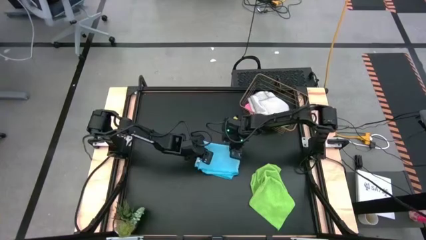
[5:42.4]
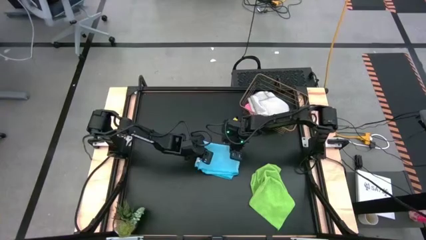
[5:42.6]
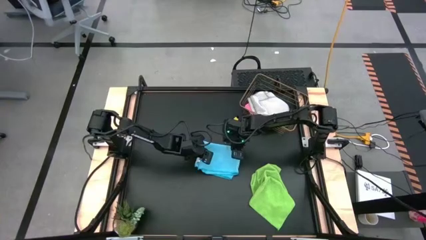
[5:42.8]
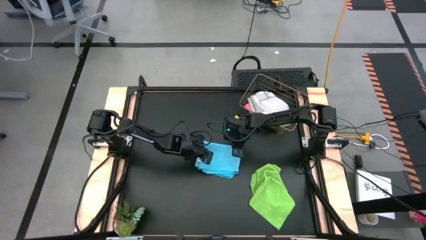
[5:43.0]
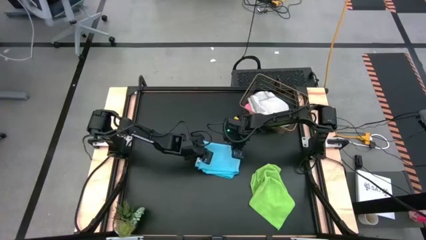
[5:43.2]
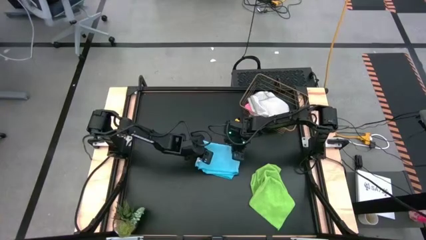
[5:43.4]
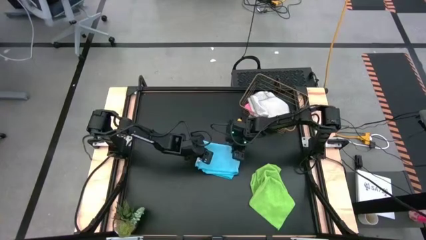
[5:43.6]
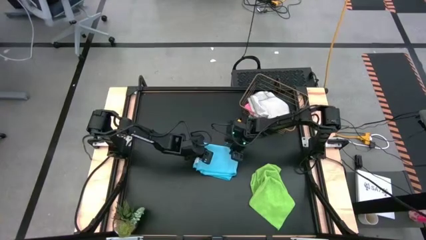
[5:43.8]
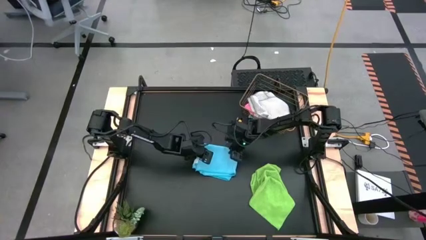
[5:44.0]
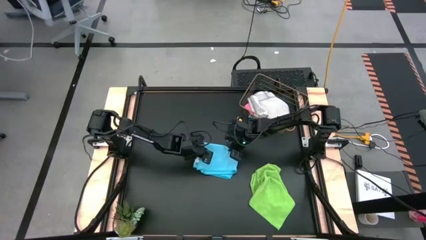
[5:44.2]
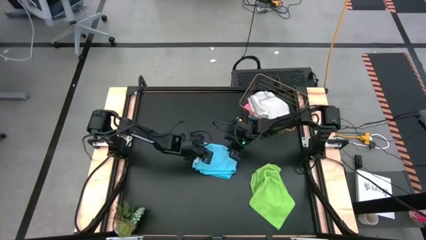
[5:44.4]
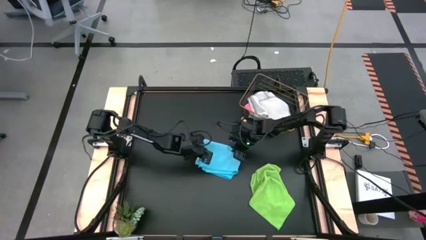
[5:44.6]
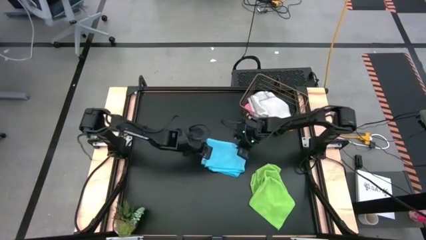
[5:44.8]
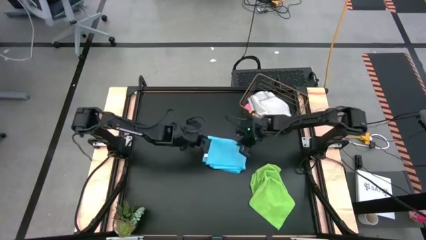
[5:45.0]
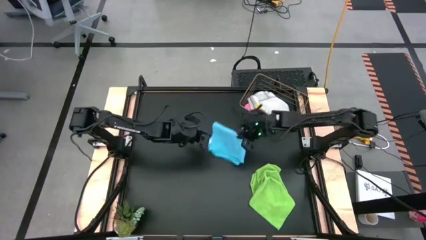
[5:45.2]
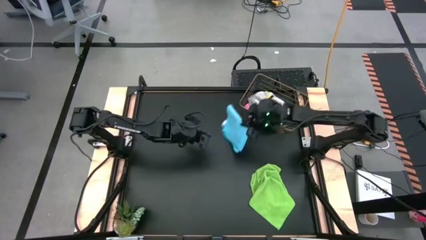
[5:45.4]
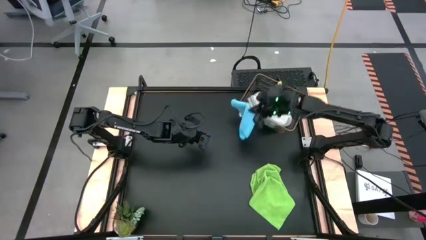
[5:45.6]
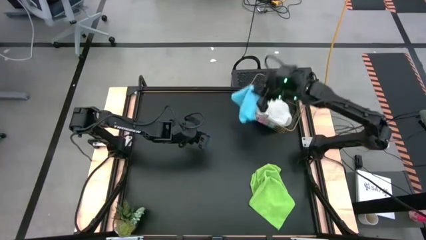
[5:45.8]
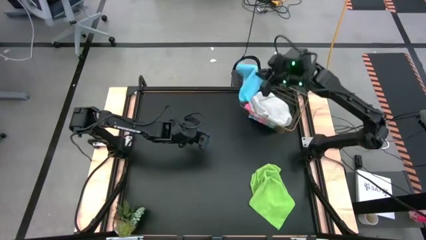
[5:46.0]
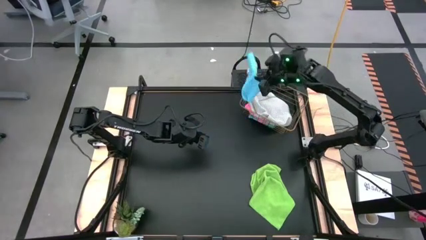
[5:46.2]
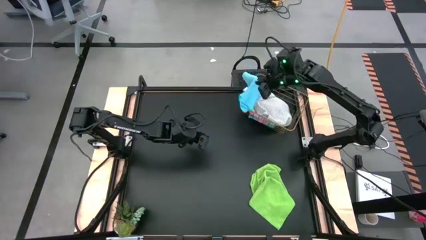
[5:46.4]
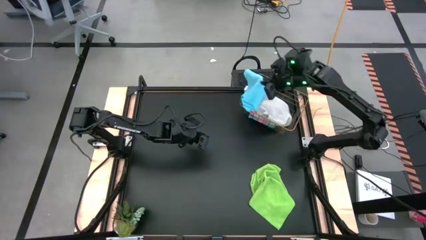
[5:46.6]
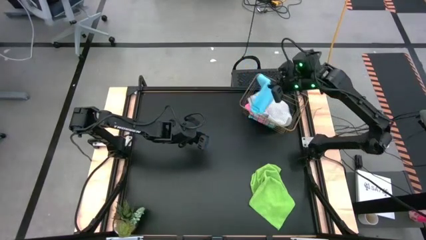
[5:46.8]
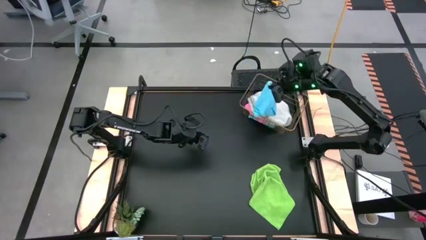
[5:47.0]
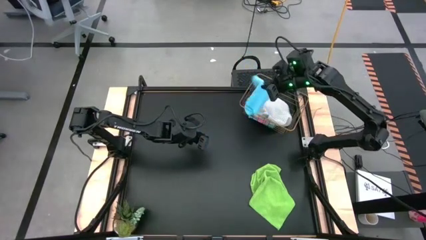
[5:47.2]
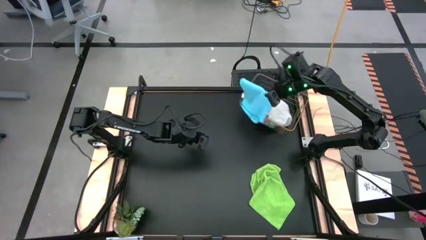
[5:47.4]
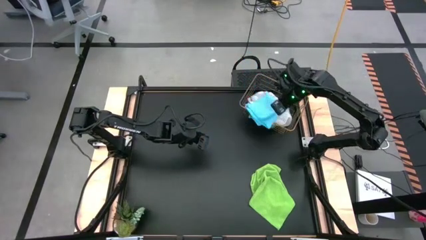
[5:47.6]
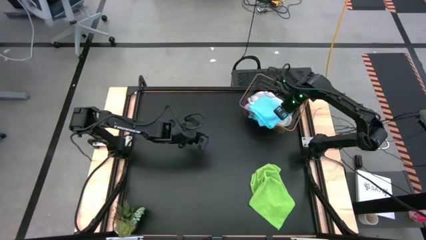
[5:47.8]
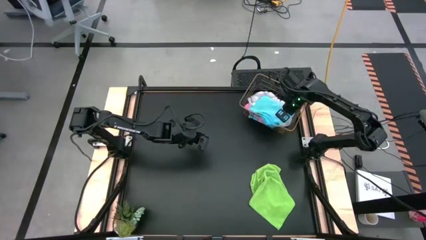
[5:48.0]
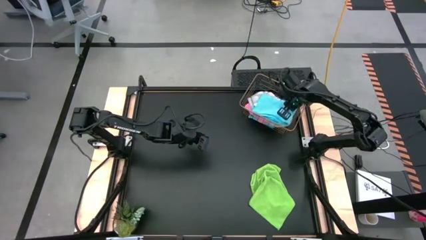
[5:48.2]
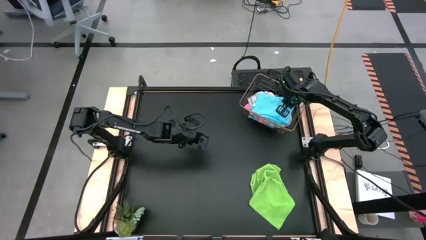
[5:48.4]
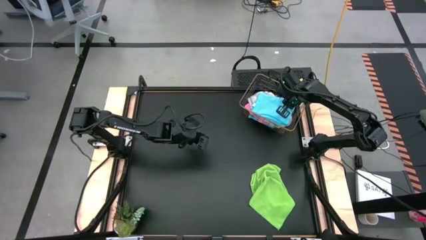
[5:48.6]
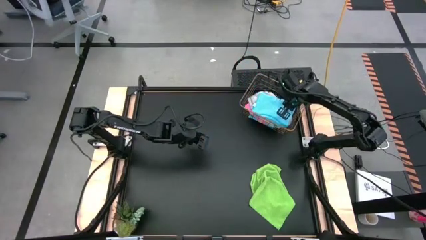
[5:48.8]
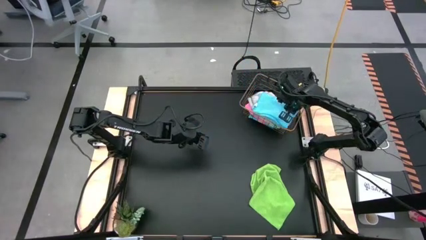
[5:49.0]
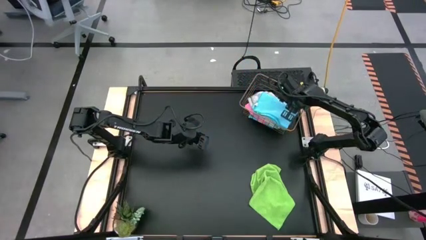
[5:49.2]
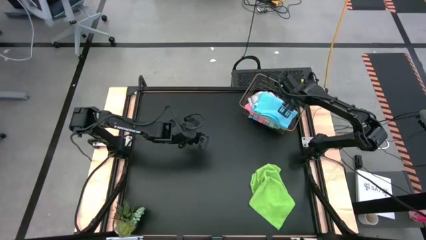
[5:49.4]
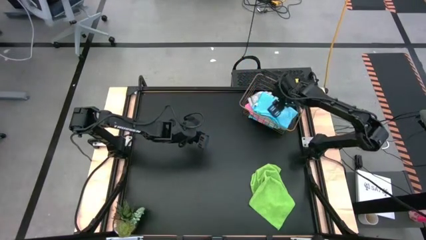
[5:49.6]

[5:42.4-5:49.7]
Task: Fold microfiber towels
Put the folded blue towel into the gold wire basket

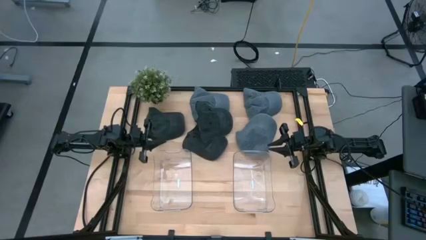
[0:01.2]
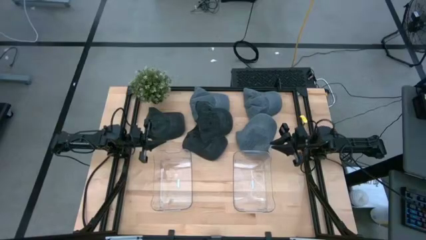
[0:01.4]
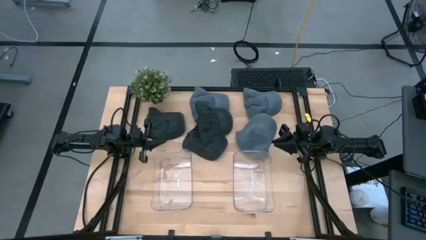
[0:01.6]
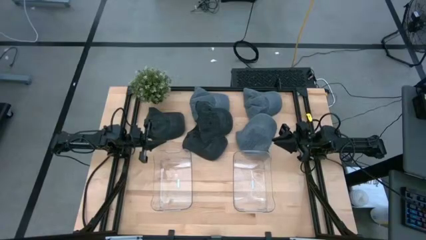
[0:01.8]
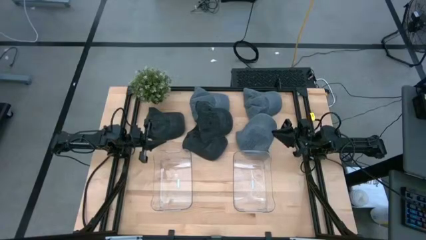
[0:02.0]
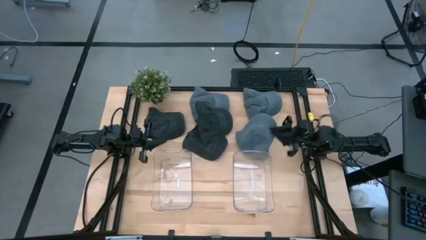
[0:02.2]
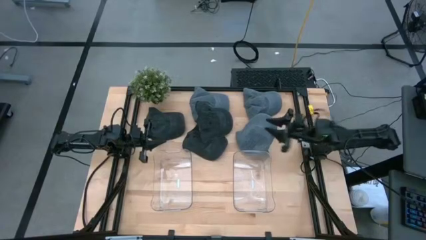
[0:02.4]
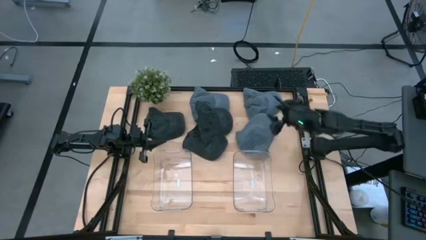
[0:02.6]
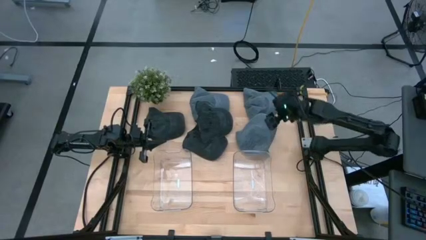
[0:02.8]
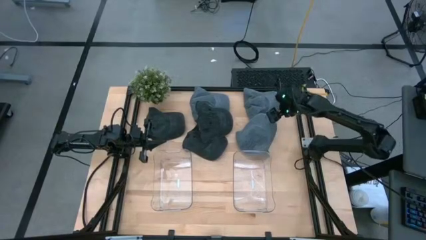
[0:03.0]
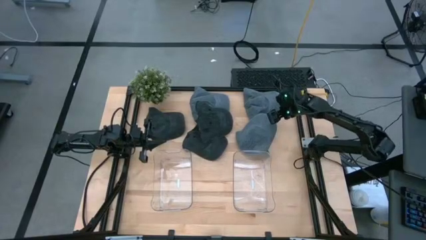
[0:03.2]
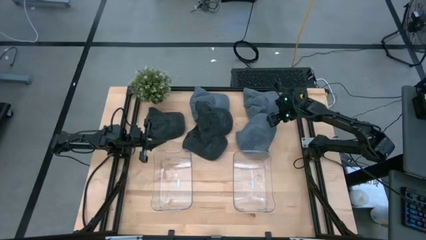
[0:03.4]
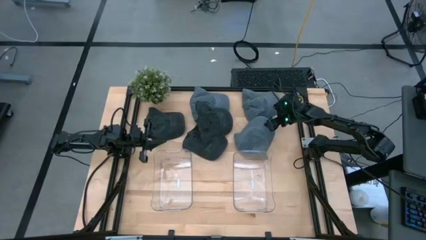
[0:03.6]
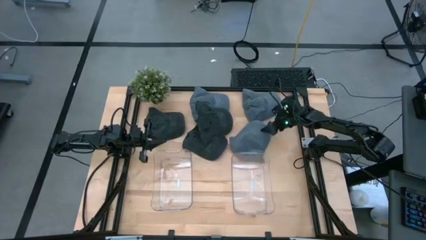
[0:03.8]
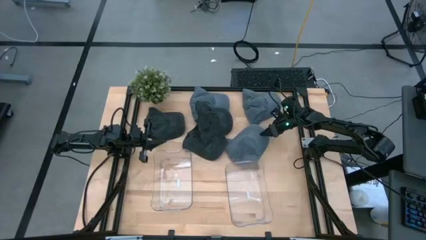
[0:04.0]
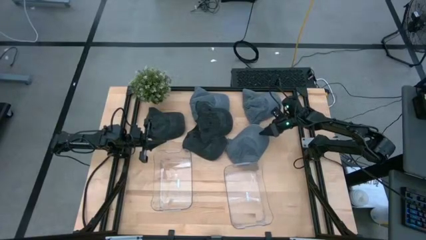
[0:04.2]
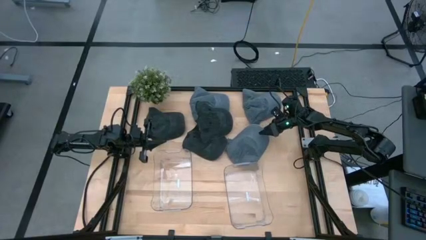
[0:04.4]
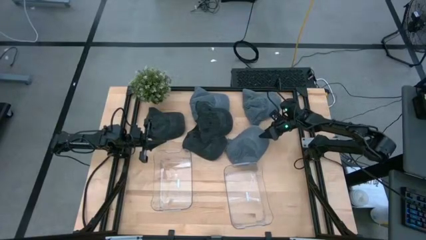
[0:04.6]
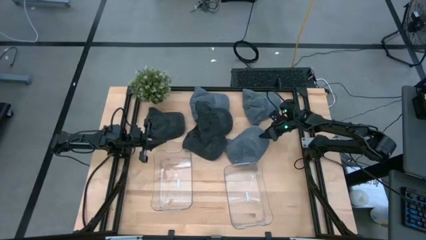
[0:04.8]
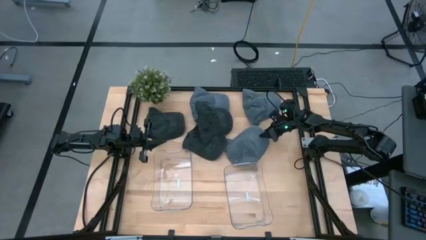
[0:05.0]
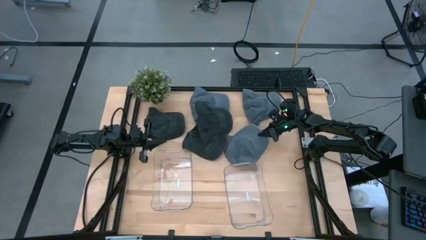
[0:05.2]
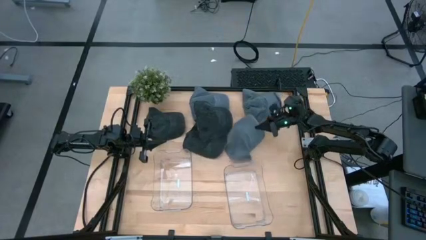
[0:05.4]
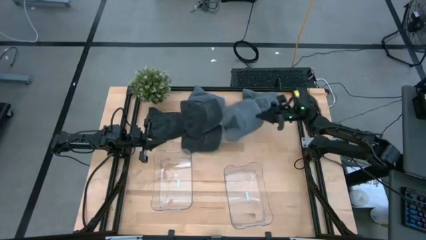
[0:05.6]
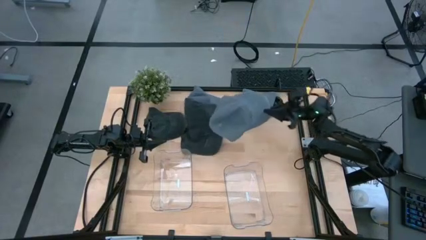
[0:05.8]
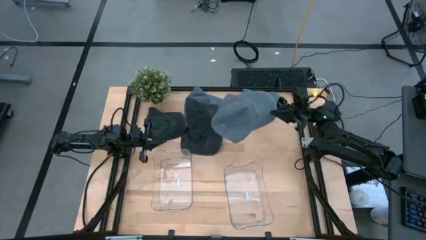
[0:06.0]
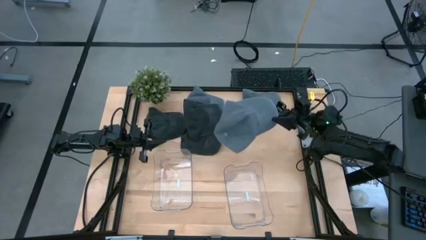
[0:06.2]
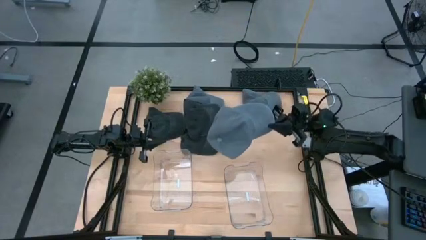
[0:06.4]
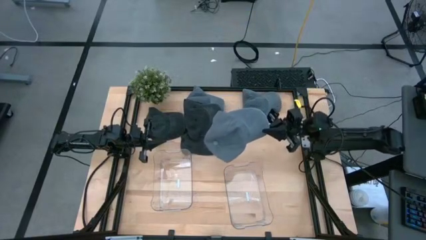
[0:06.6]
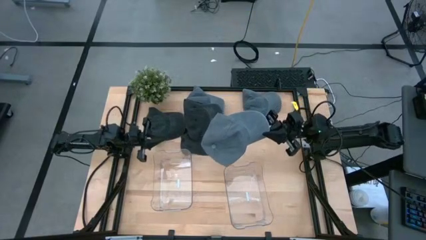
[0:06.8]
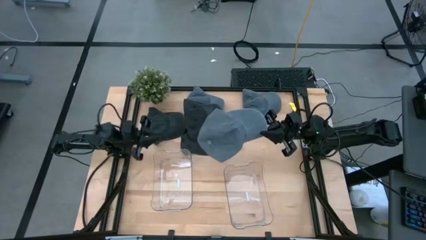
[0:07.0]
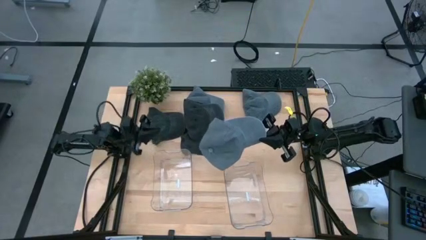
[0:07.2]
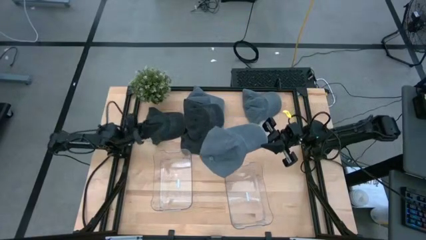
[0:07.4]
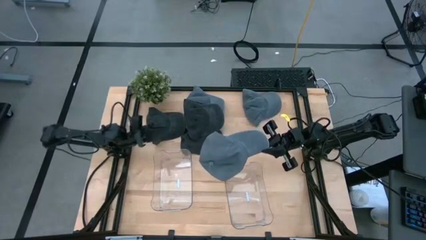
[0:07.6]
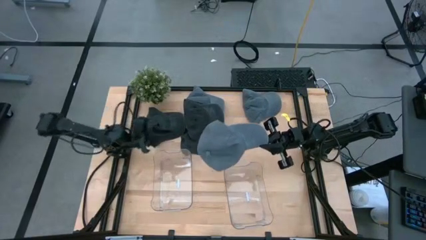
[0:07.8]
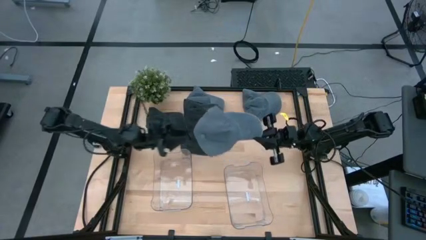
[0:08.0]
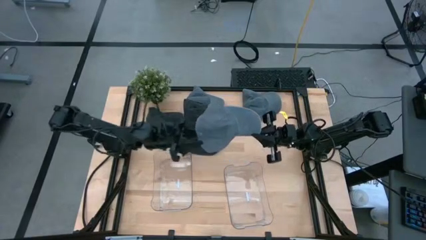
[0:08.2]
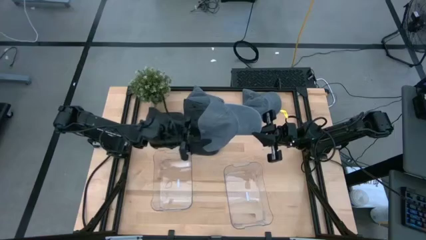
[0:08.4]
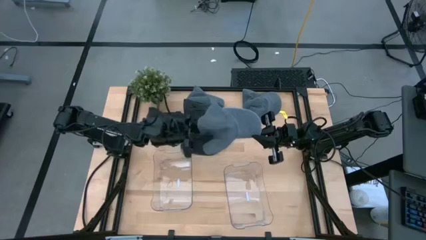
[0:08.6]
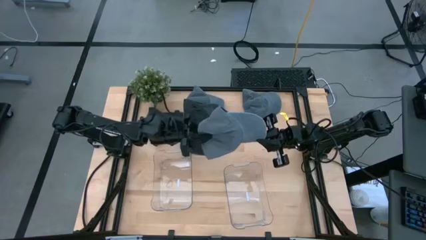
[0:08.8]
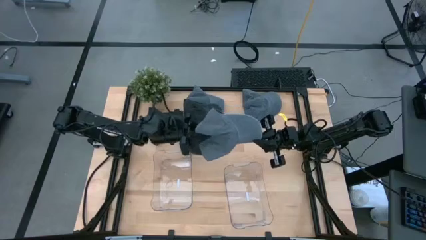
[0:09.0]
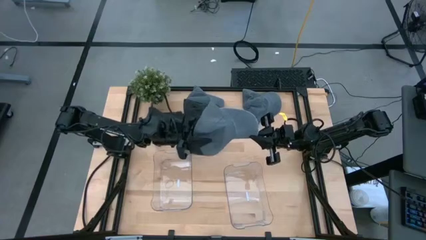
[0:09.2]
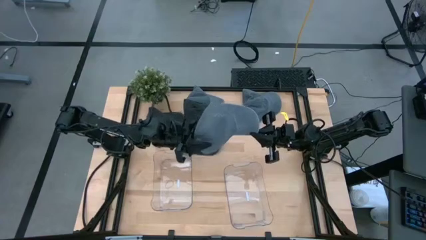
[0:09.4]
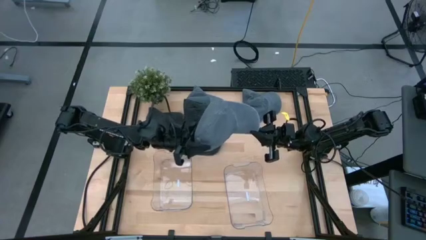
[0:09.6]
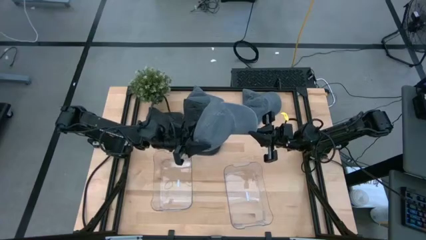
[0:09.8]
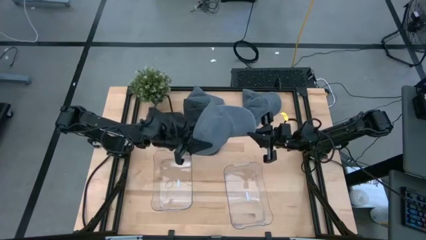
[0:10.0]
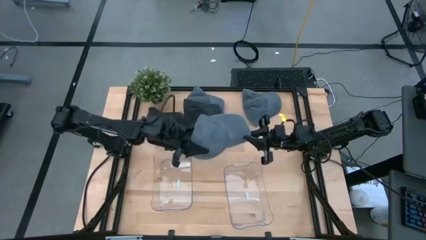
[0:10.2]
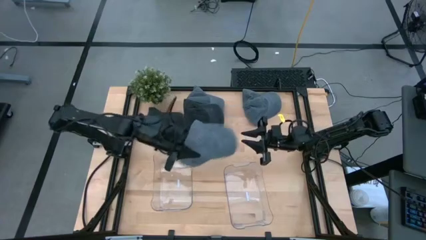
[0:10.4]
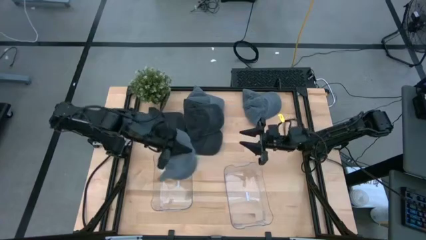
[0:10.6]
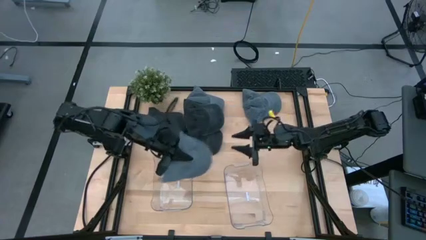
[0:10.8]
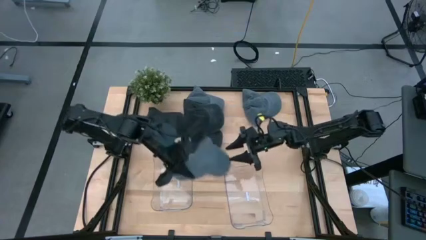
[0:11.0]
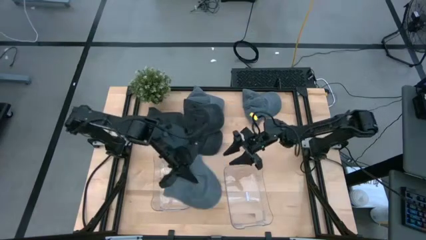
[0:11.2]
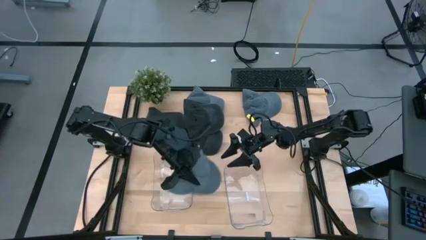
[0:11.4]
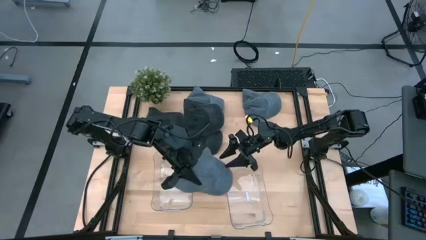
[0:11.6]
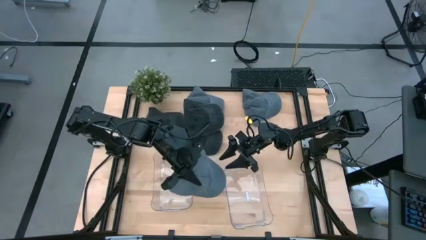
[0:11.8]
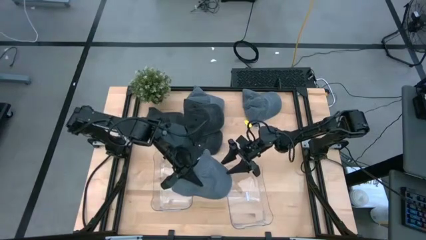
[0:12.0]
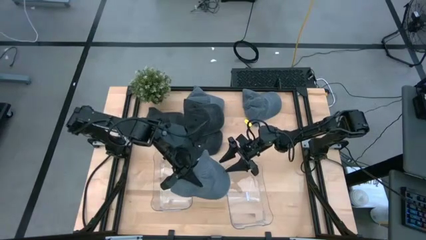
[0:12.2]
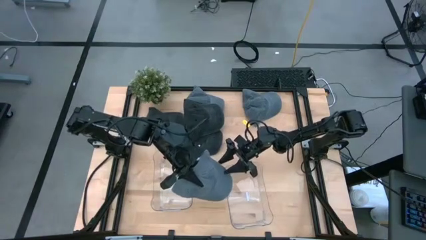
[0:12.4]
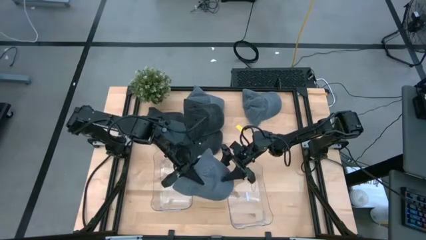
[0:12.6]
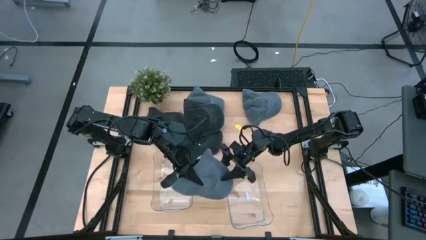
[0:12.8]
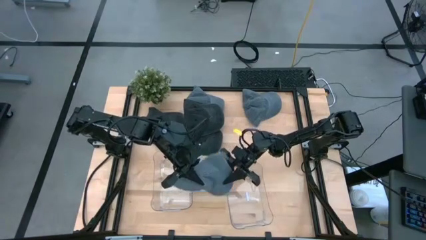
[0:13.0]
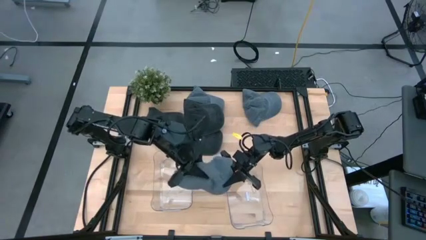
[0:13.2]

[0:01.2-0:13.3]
Task: Pick & Place hat
Put the bottom right gray cap into the left transparent bin
